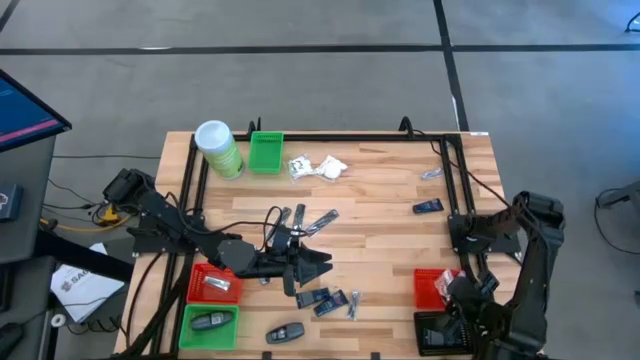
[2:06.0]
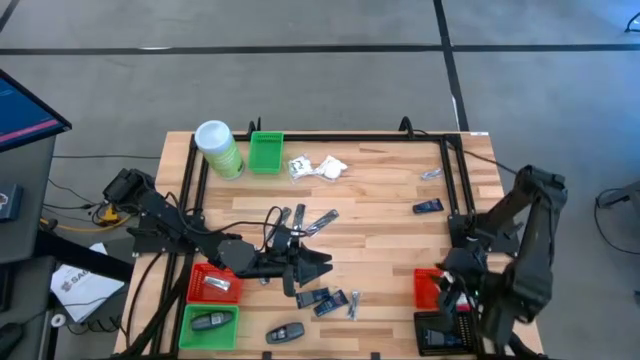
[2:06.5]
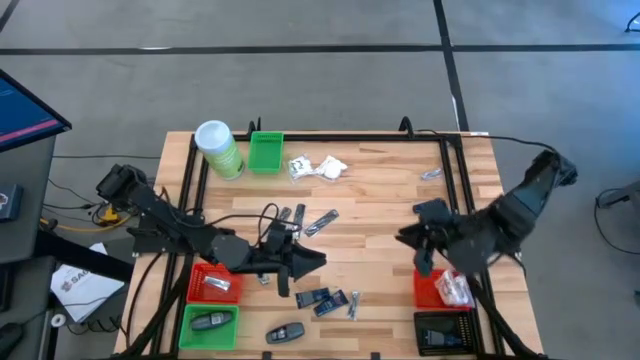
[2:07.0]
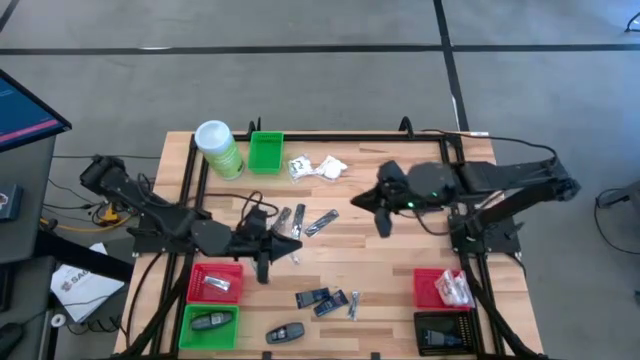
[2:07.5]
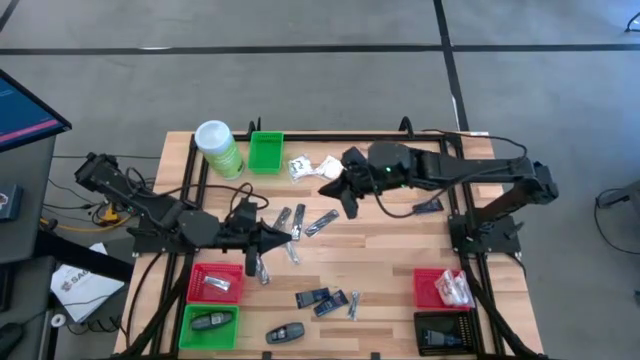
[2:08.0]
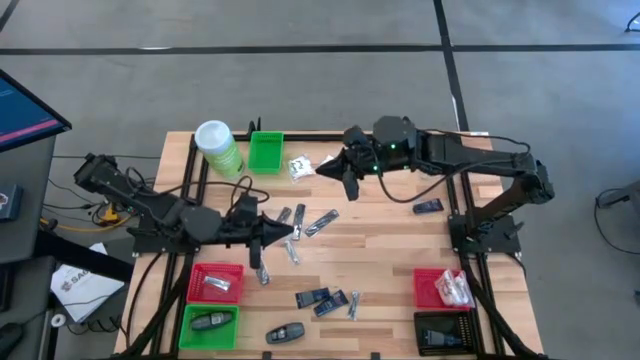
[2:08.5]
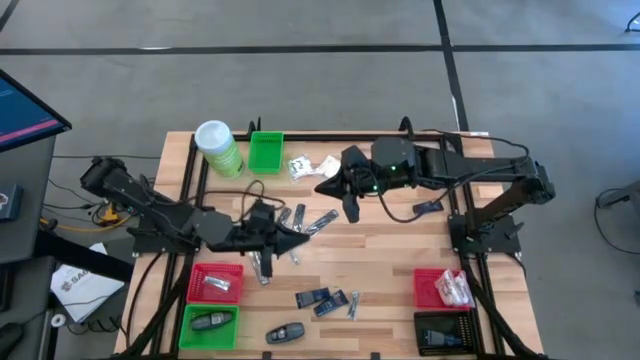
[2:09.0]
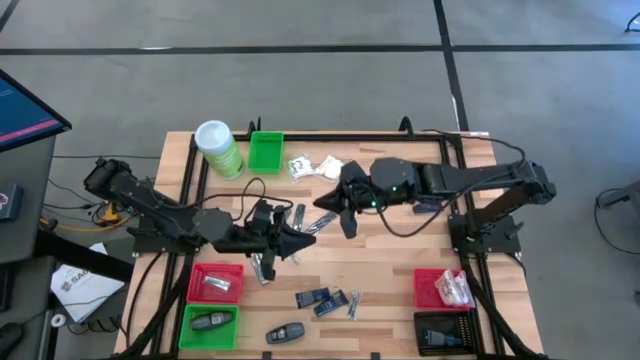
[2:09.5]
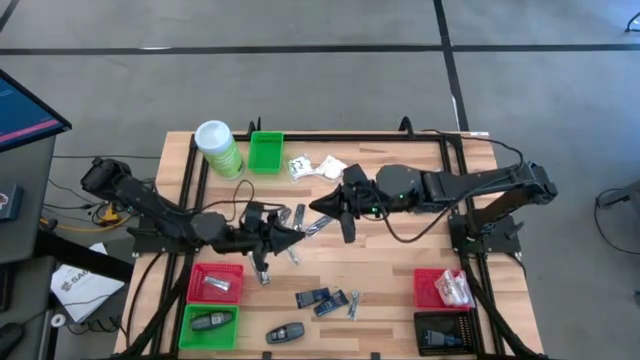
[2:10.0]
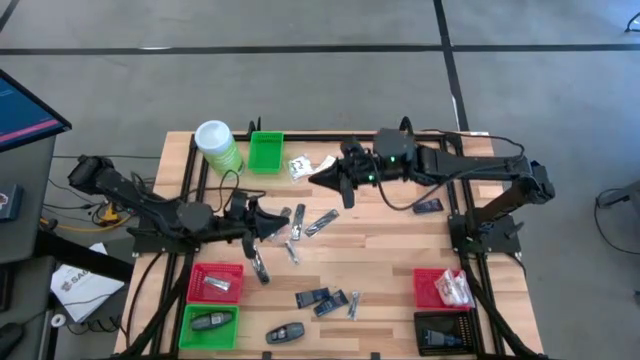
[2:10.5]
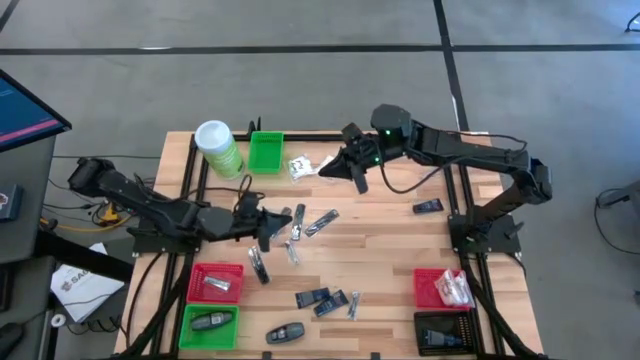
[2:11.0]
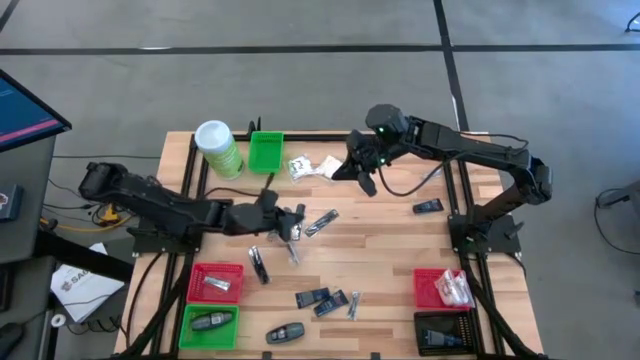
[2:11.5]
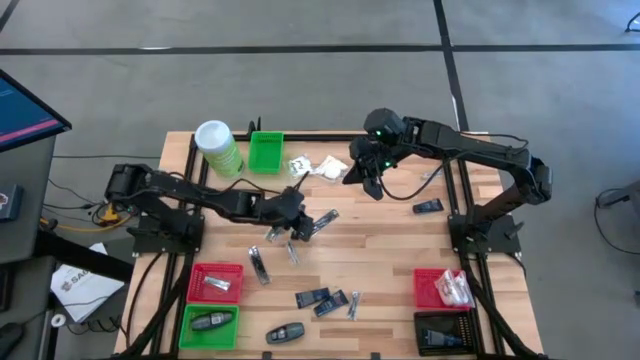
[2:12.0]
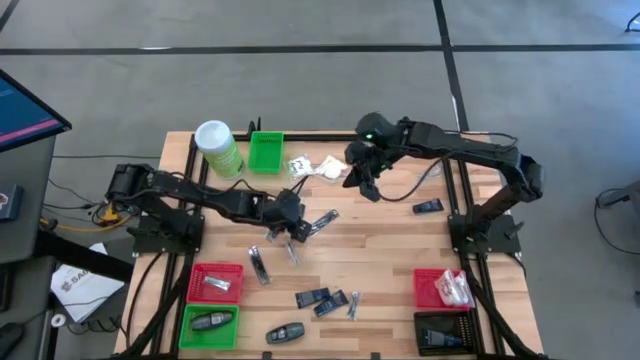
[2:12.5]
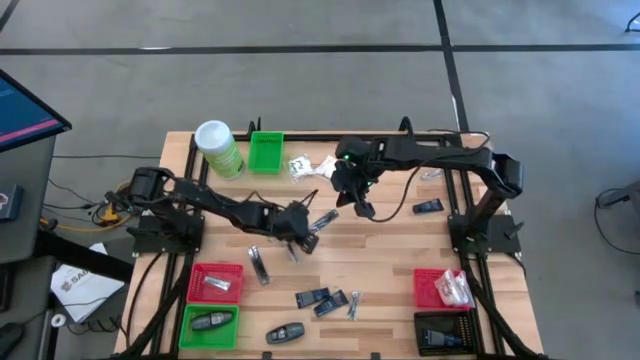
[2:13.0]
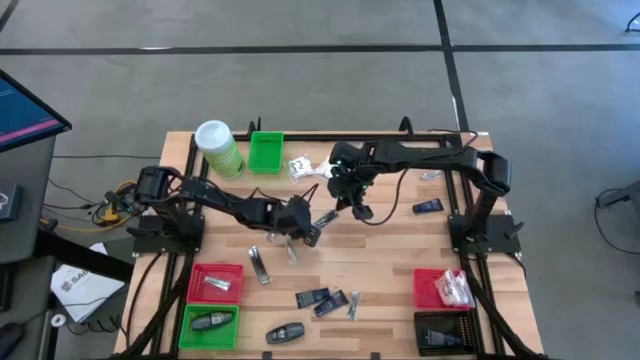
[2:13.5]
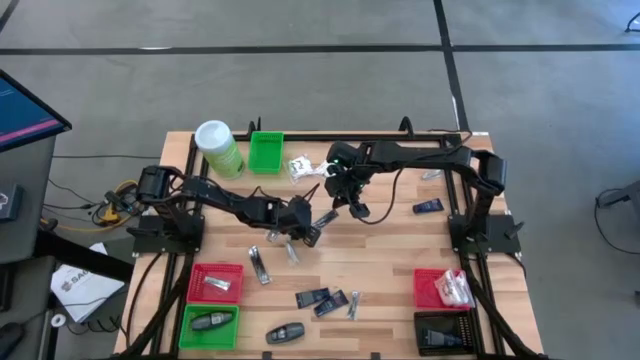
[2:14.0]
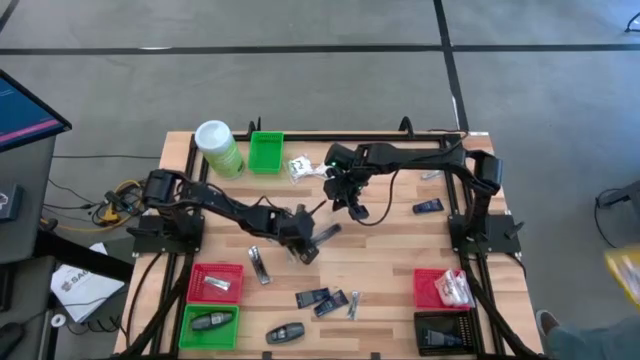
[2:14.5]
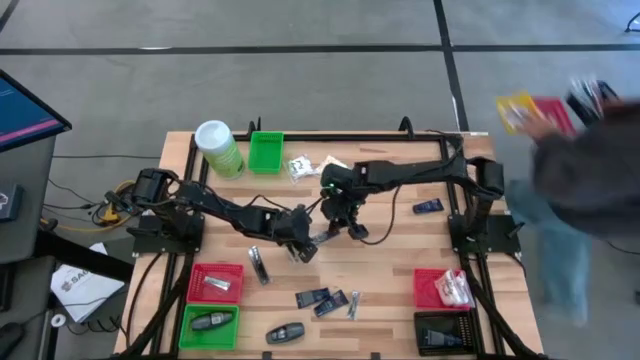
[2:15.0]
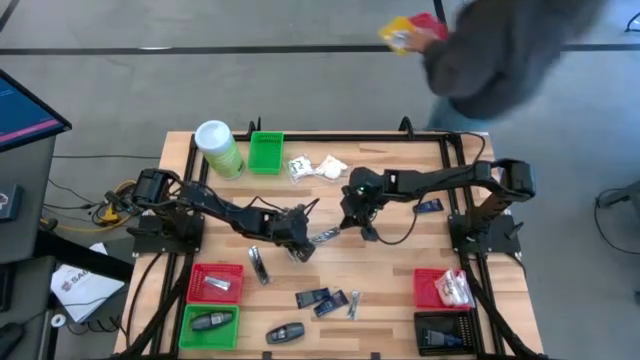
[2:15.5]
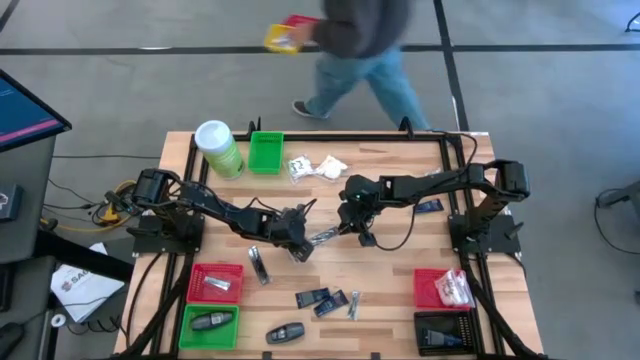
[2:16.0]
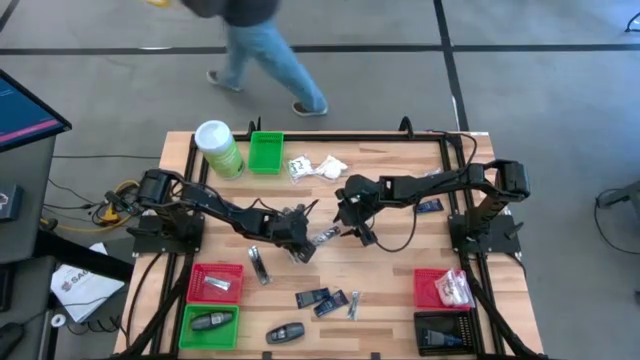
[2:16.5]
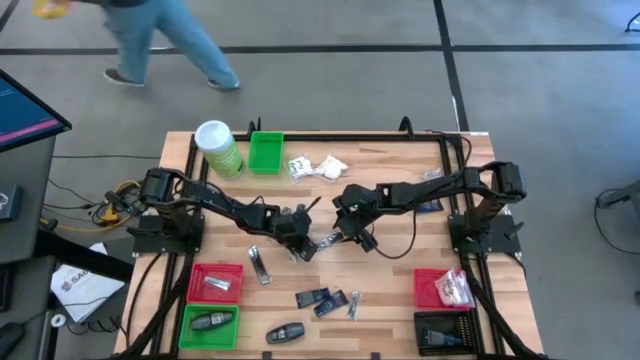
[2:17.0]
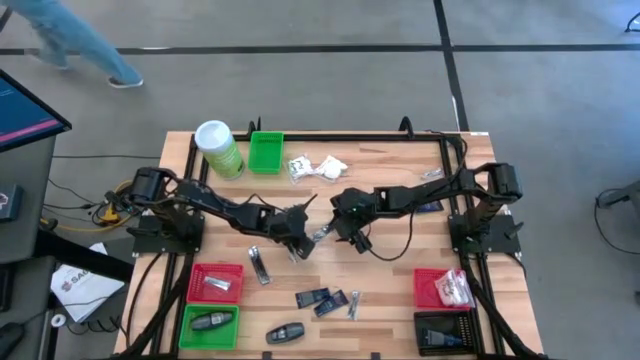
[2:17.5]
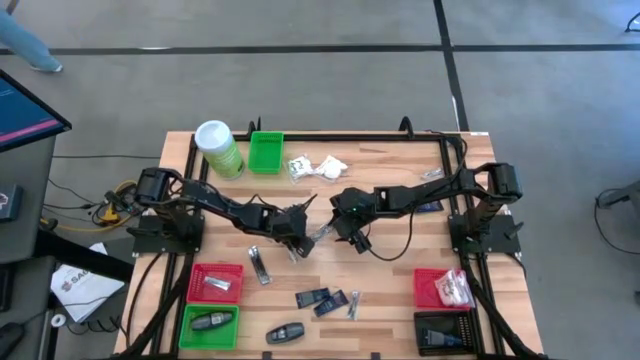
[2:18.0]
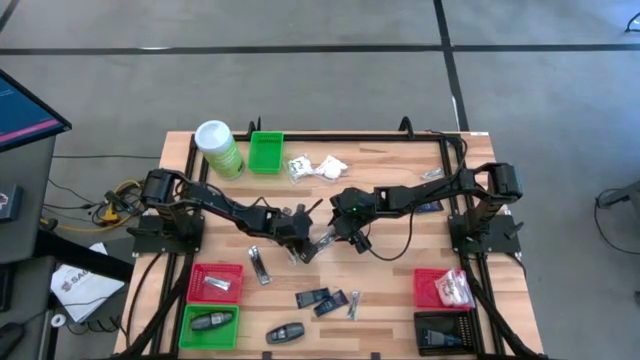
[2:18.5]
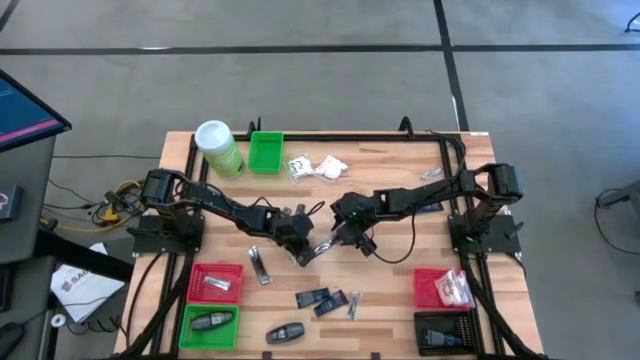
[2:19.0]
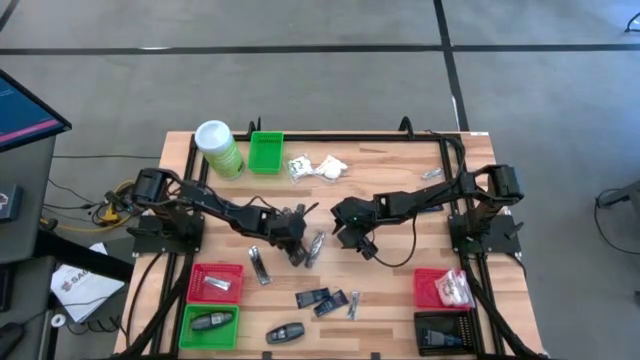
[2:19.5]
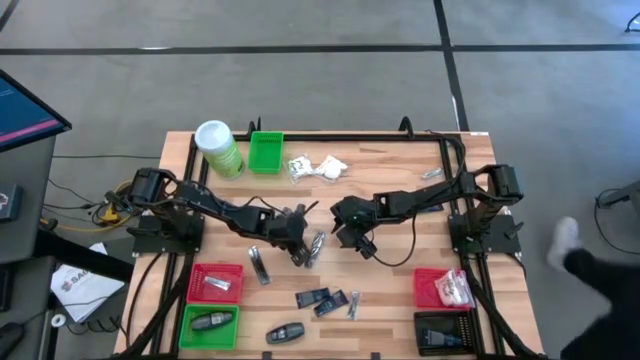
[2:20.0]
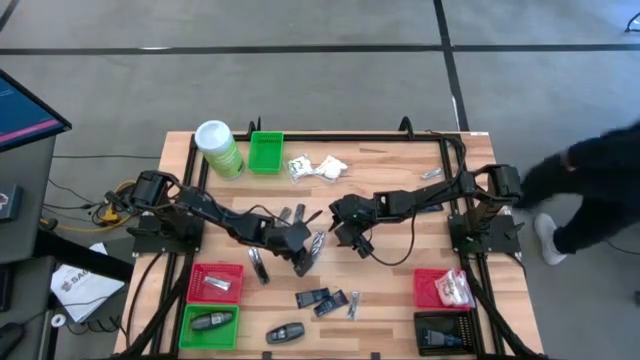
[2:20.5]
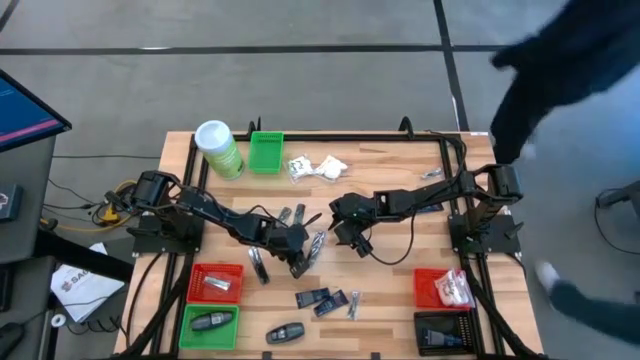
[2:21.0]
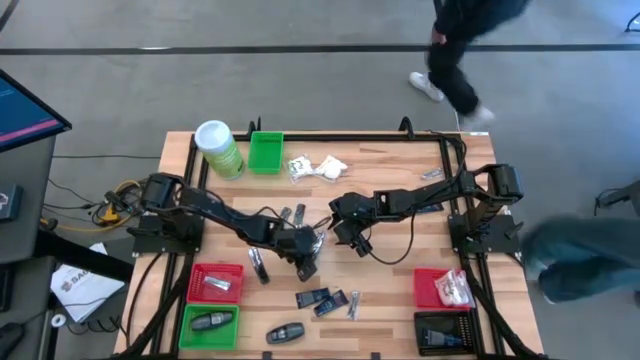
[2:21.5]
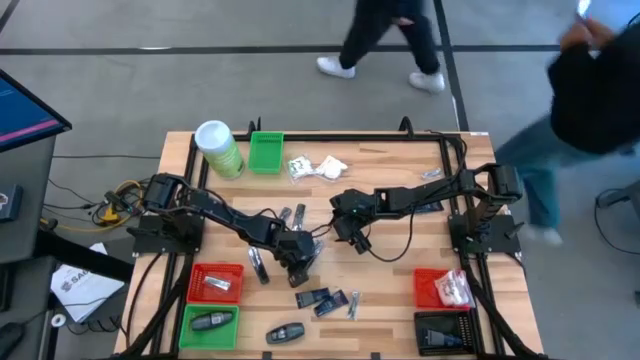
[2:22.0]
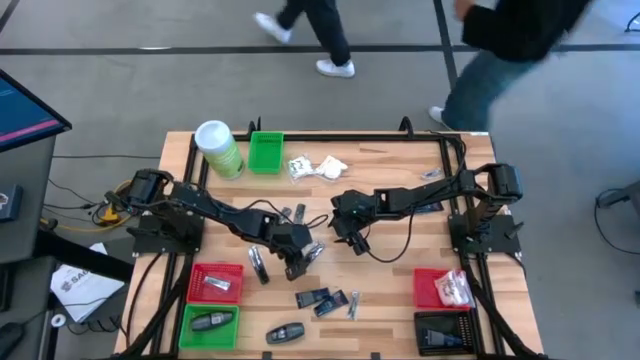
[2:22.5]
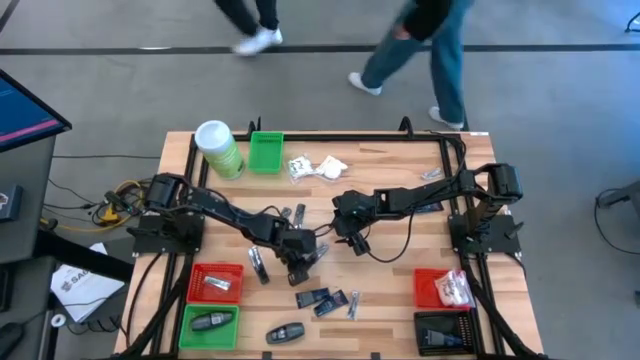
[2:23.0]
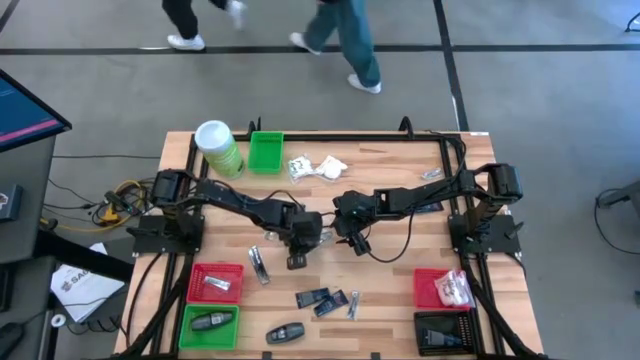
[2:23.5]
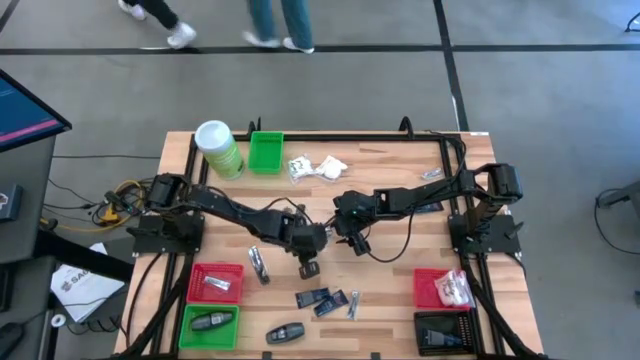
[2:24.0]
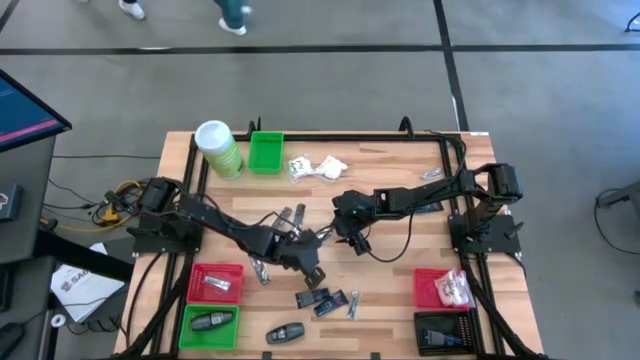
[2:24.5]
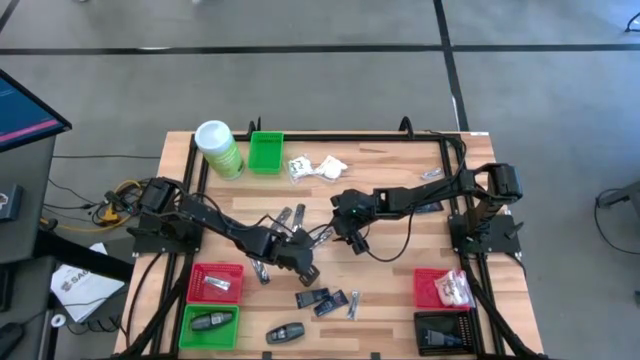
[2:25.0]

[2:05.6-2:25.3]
Task: Pick & Place Travel size toiletries
Put the black comb into the top green bin

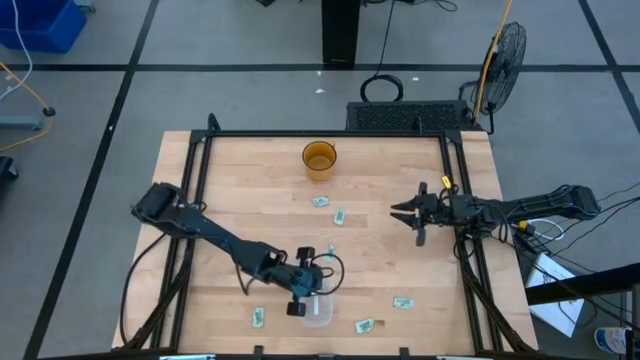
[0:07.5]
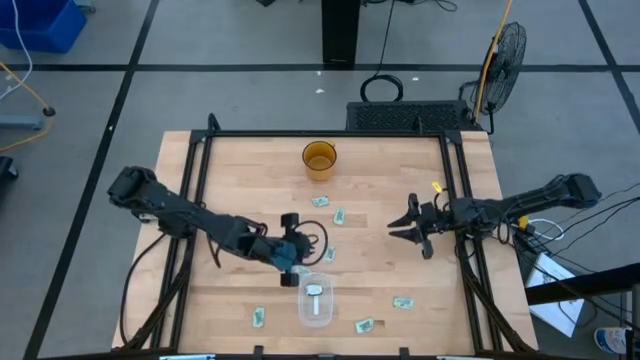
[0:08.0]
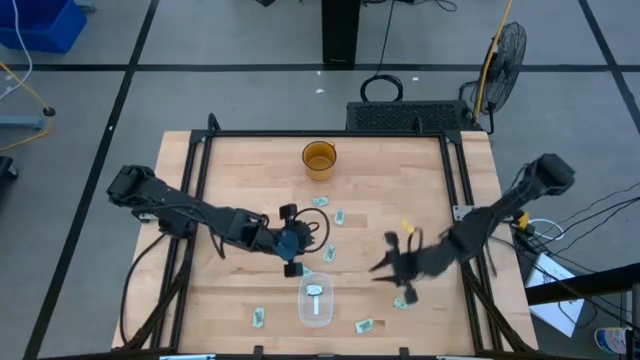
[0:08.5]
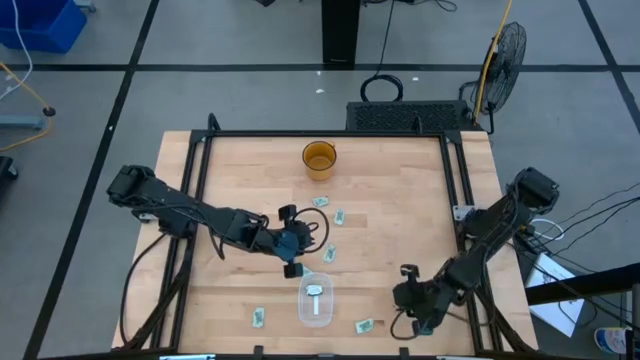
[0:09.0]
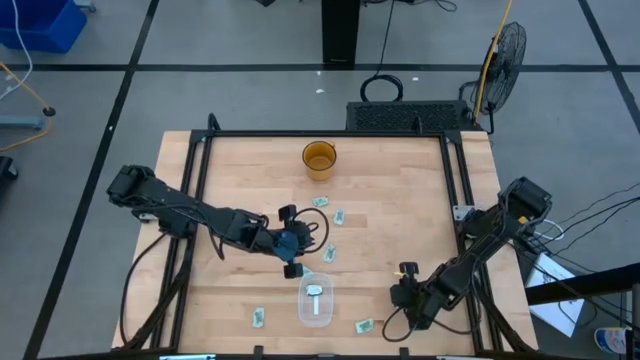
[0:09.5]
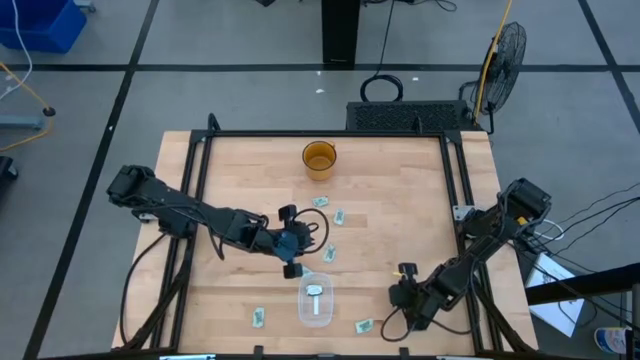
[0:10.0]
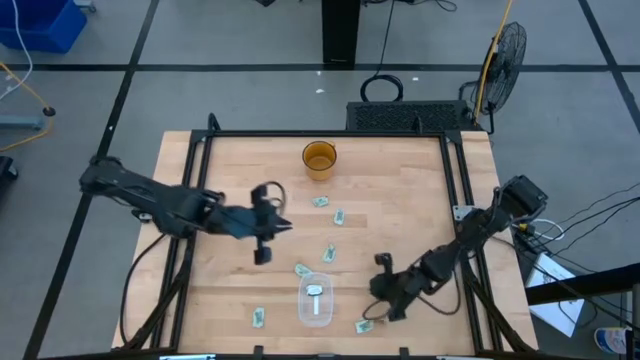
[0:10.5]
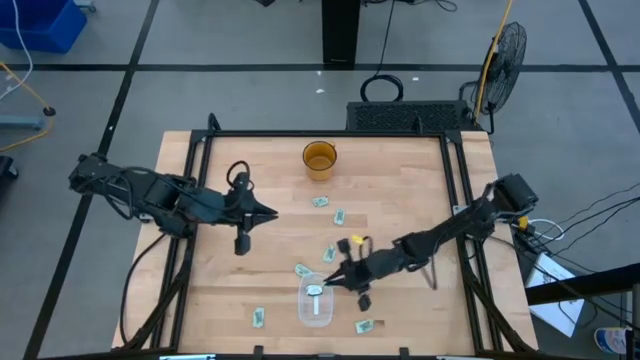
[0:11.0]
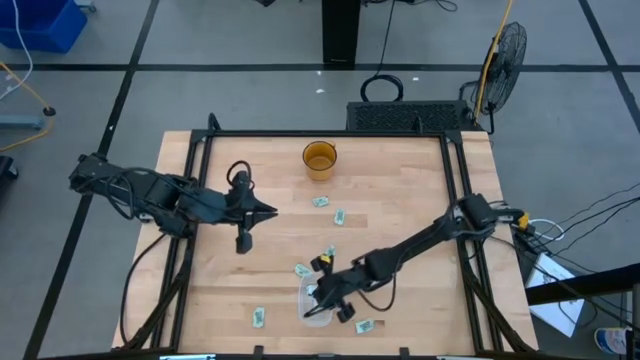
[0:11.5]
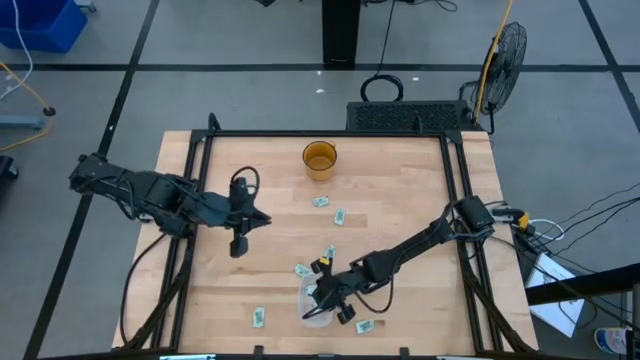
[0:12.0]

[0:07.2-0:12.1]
Task: Pick and place Stevia / Truvia into bins
Put the green stevia packet into the transparent container
